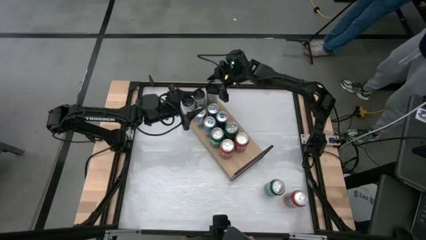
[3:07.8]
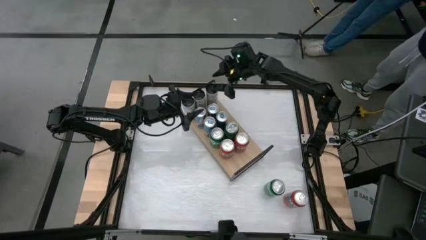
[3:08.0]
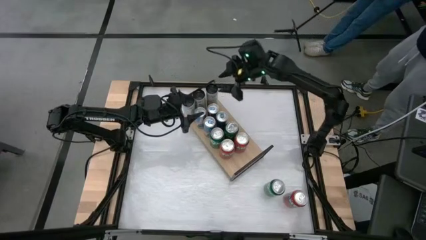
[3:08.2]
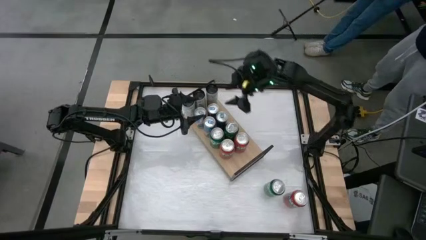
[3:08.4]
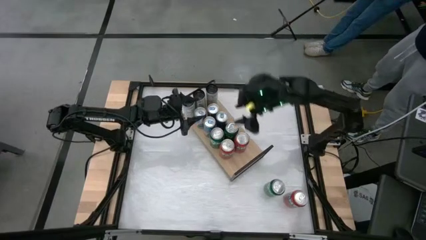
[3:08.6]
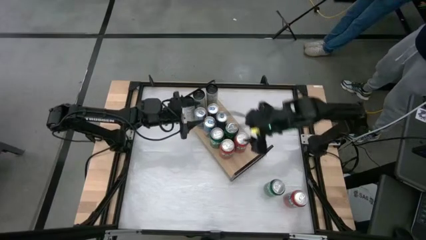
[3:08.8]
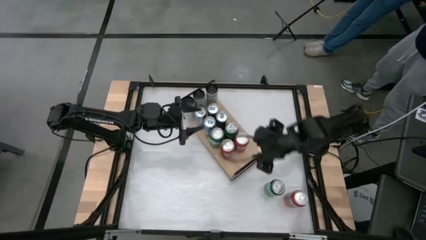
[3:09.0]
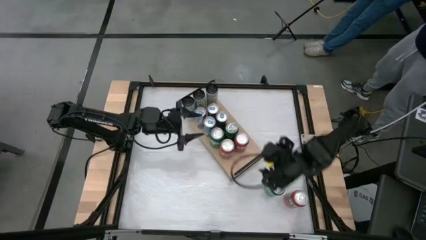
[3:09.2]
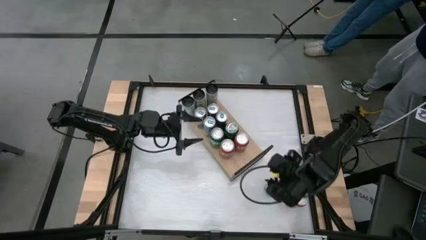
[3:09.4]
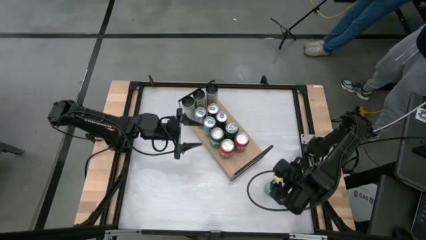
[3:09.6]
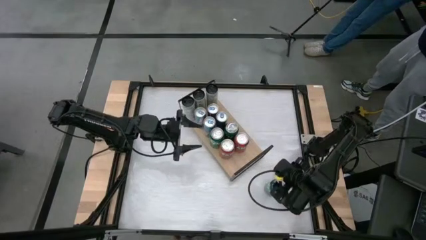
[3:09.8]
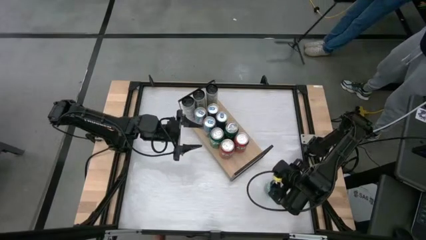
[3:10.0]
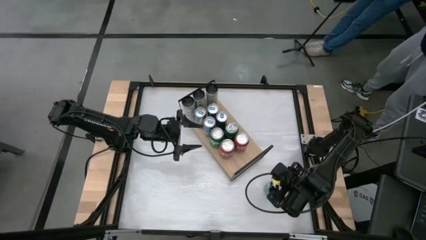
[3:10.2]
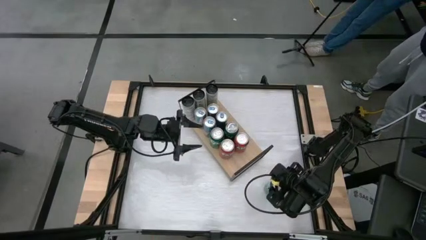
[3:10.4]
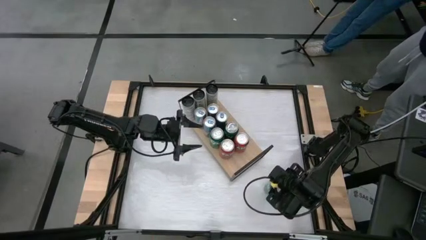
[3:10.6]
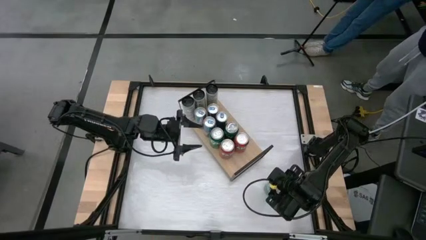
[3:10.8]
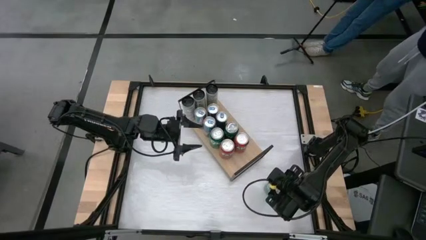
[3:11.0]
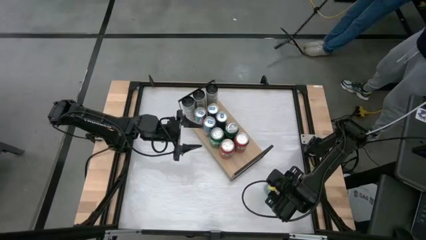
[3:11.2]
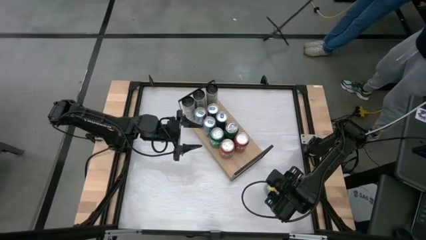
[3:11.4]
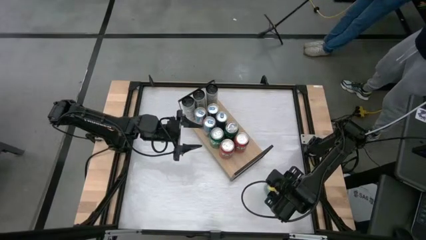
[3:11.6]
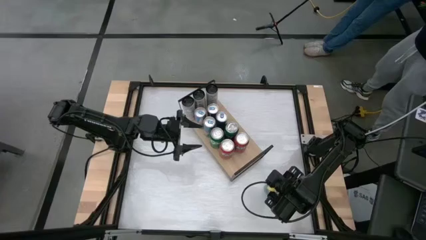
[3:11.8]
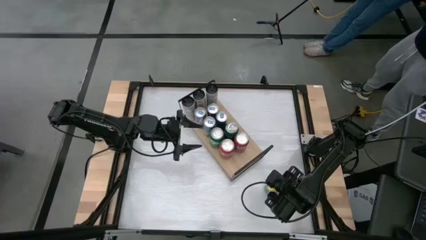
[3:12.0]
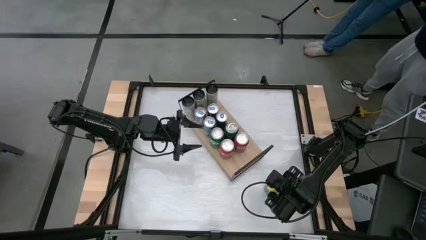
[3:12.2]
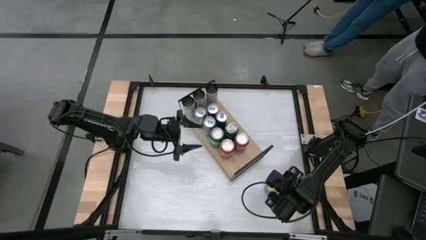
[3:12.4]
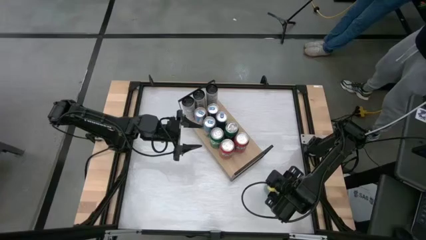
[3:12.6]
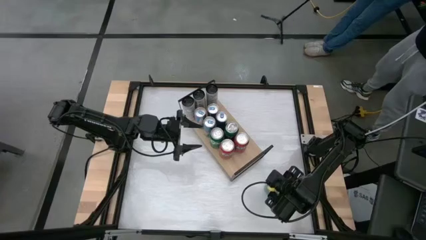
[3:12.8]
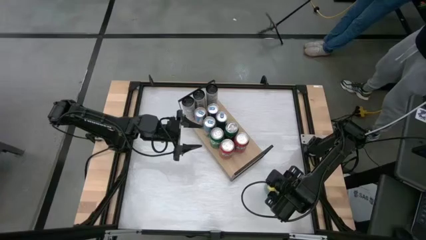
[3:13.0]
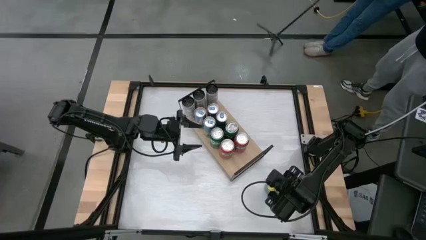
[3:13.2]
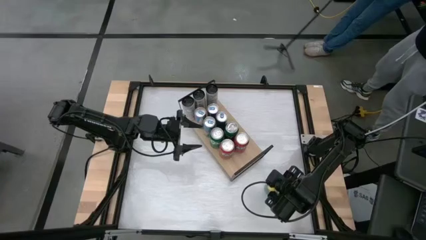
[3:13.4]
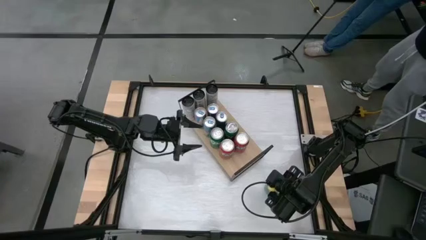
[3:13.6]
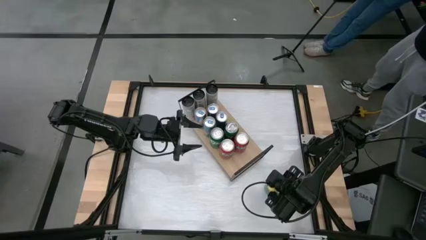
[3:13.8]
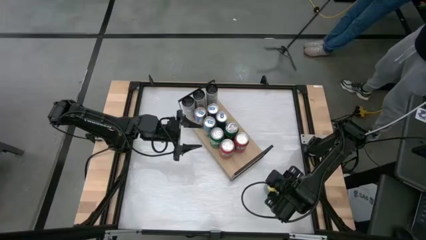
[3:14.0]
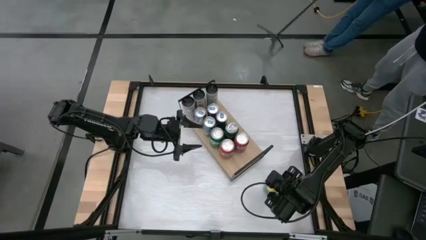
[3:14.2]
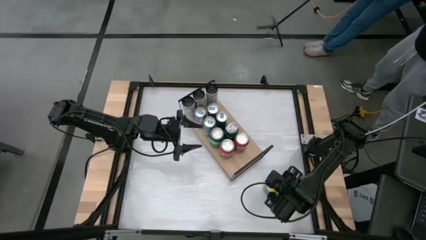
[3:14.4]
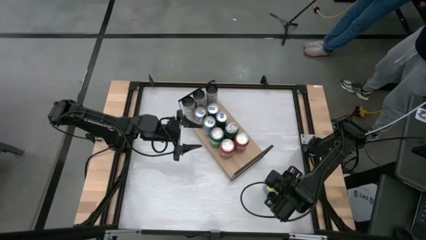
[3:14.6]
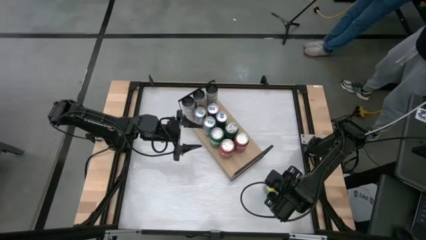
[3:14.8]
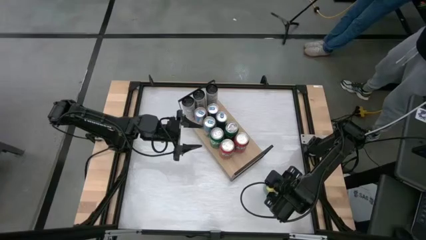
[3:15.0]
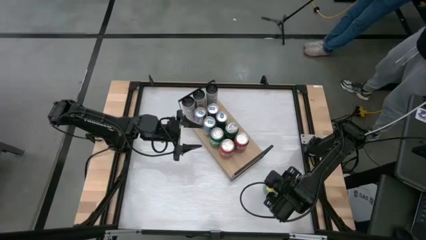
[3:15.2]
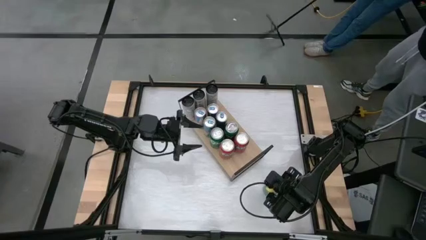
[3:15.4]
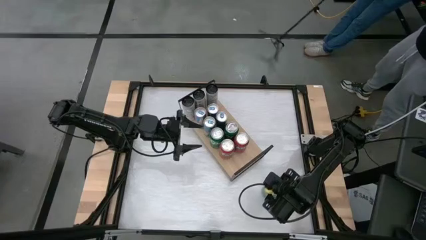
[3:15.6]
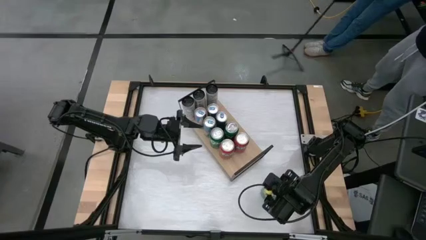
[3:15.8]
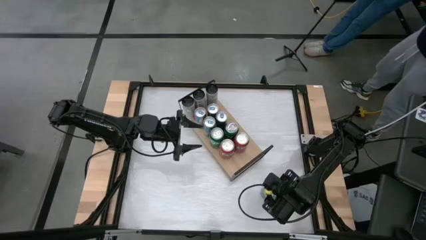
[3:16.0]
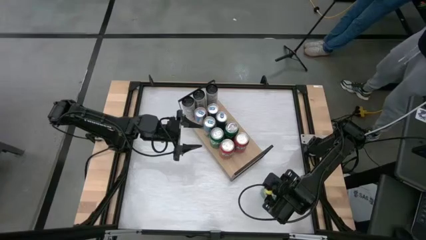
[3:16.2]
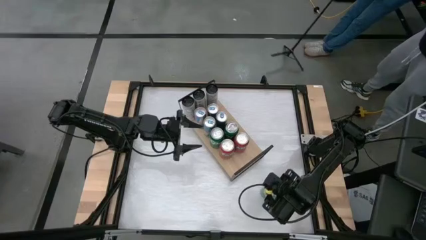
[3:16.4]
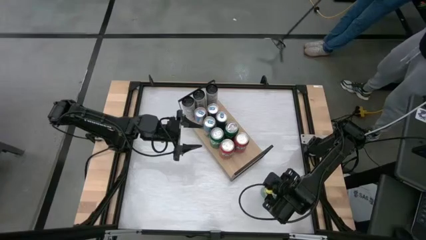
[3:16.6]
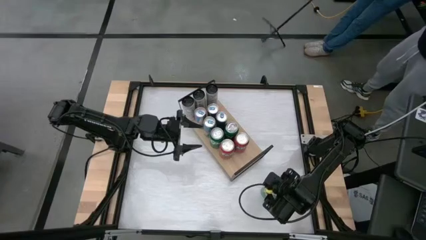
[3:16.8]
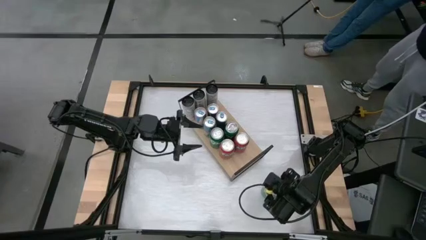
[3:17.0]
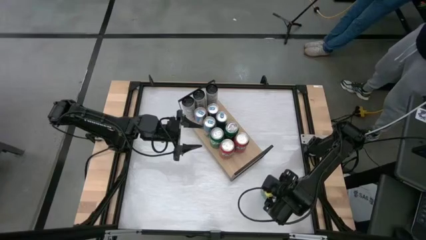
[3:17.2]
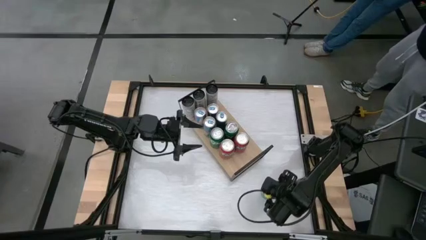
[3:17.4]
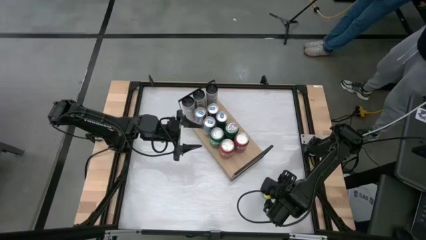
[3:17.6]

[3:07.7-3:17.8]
Task: Place canned beverage on shelf
Put the green soda can on the shelf

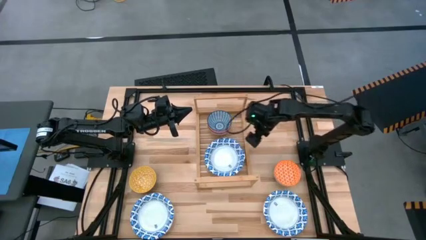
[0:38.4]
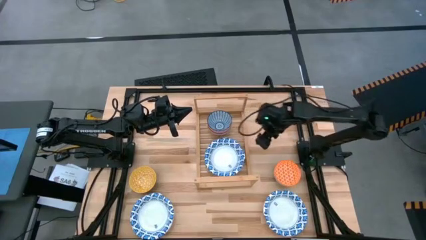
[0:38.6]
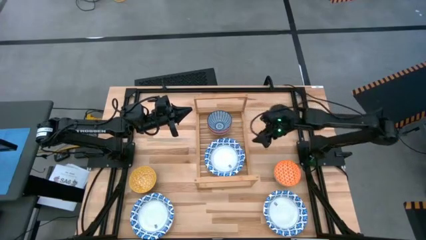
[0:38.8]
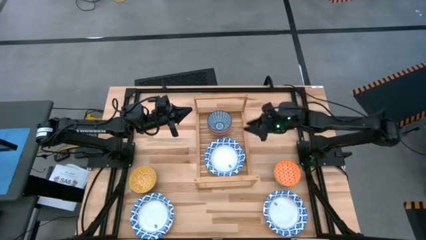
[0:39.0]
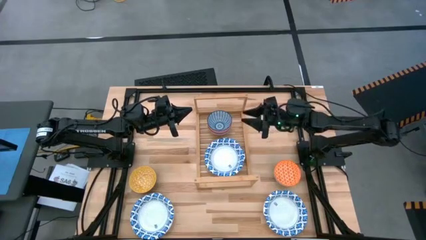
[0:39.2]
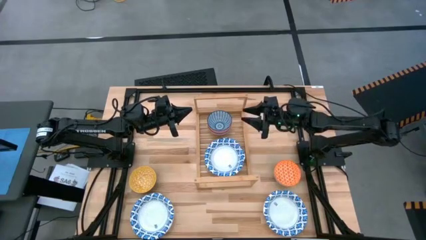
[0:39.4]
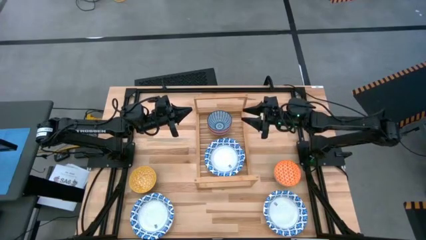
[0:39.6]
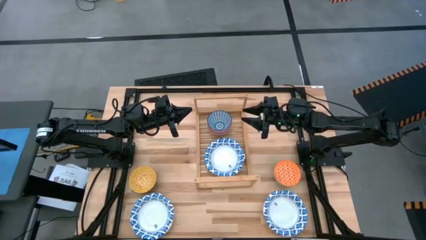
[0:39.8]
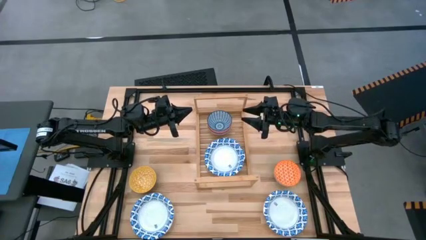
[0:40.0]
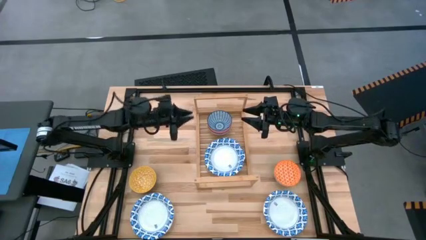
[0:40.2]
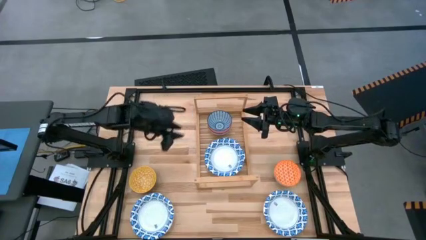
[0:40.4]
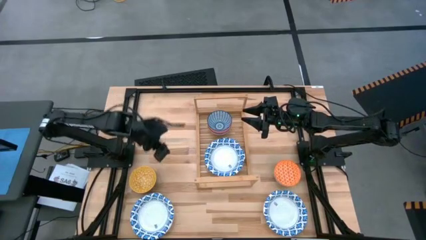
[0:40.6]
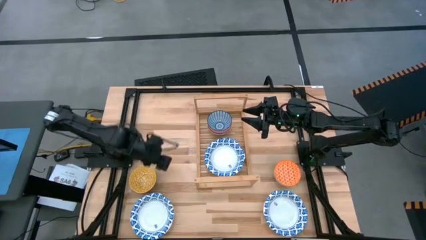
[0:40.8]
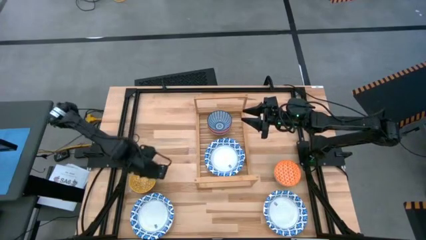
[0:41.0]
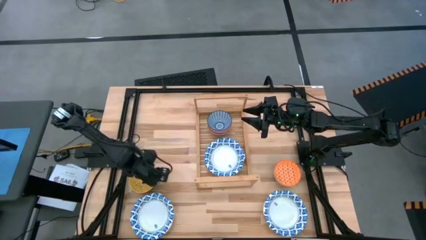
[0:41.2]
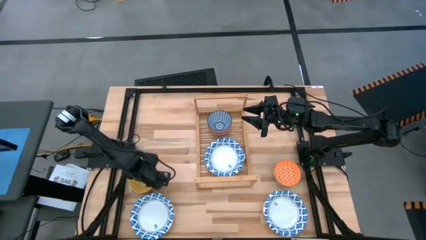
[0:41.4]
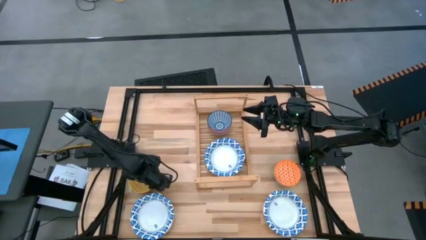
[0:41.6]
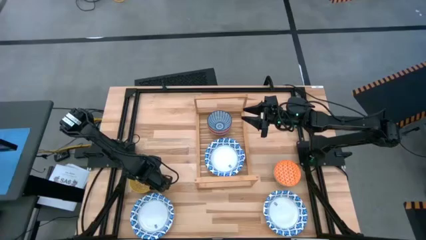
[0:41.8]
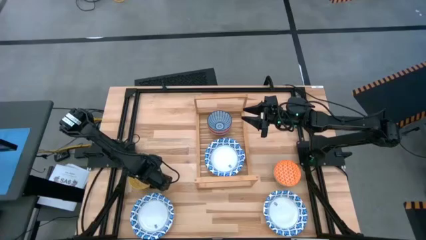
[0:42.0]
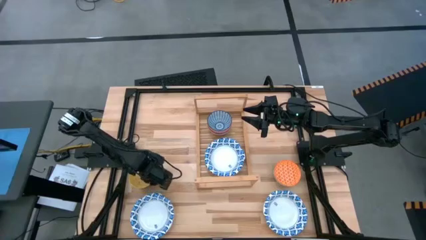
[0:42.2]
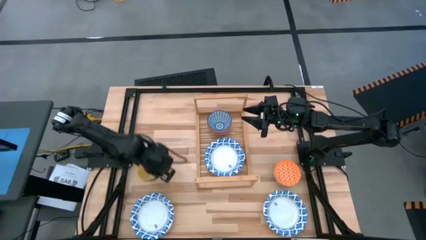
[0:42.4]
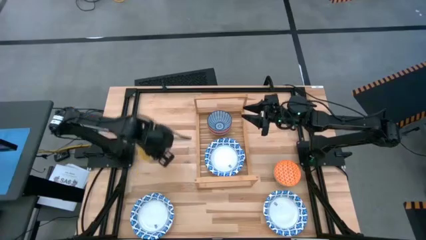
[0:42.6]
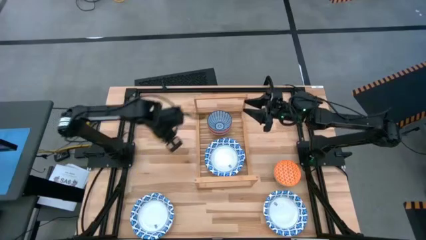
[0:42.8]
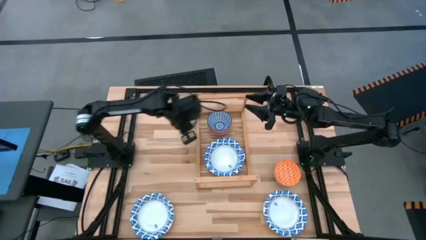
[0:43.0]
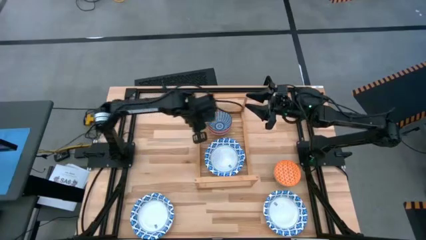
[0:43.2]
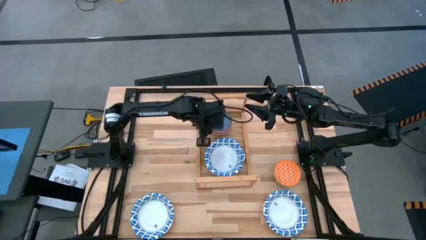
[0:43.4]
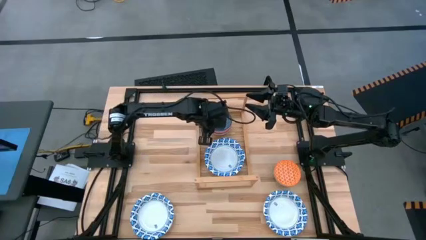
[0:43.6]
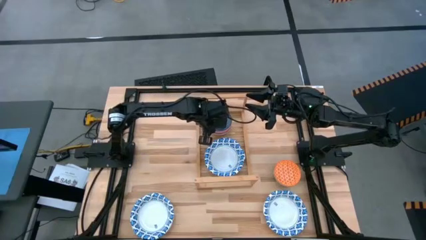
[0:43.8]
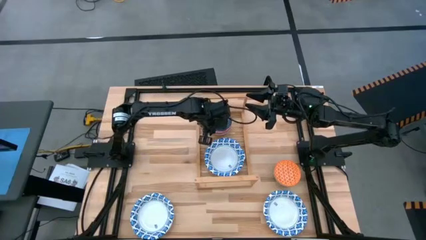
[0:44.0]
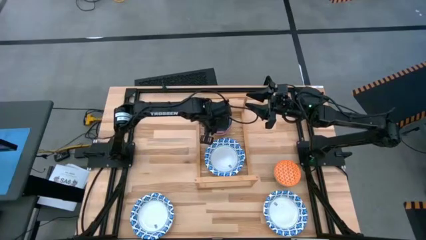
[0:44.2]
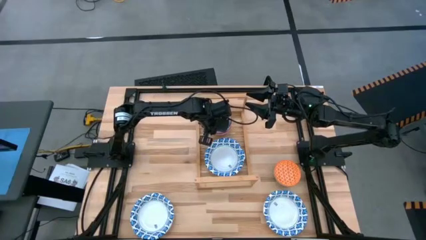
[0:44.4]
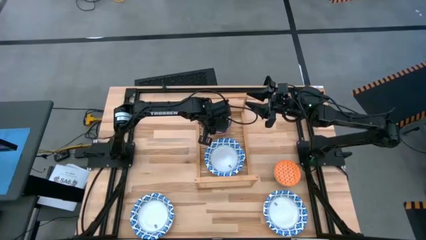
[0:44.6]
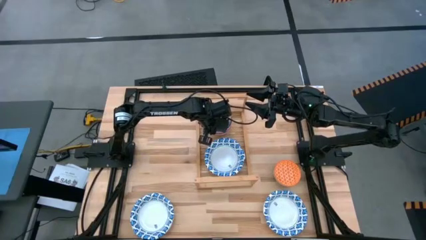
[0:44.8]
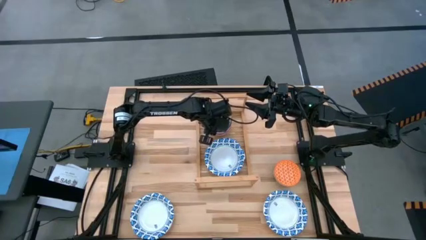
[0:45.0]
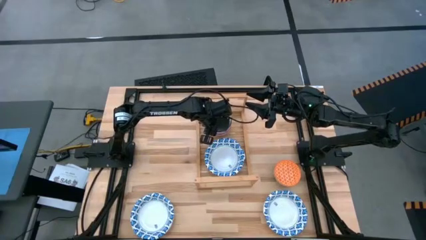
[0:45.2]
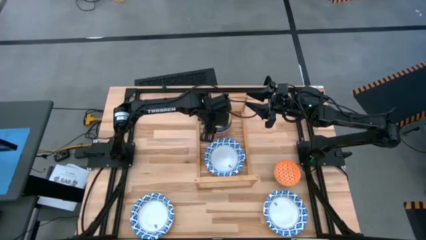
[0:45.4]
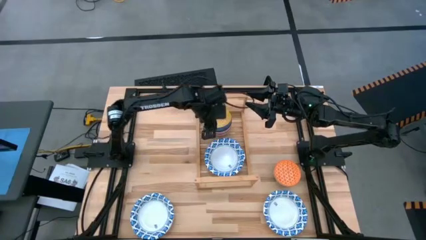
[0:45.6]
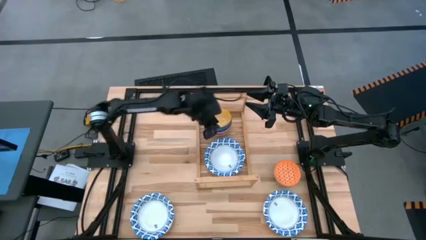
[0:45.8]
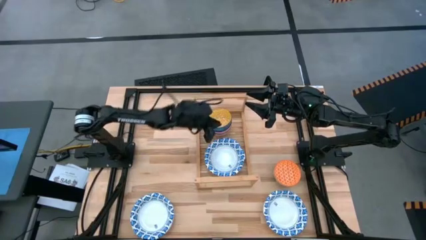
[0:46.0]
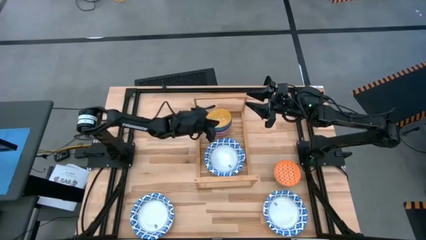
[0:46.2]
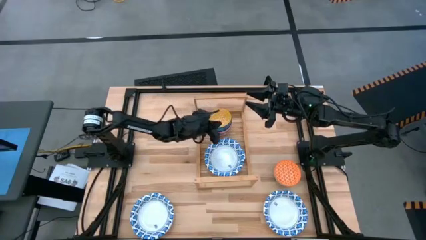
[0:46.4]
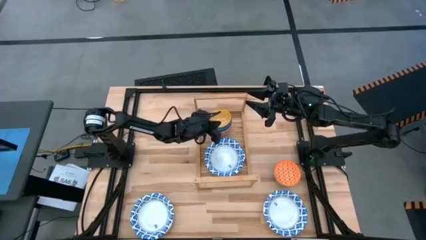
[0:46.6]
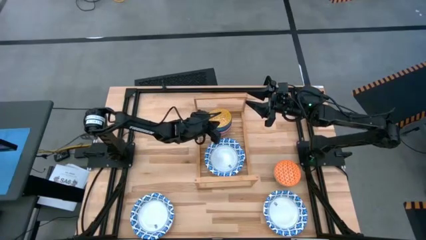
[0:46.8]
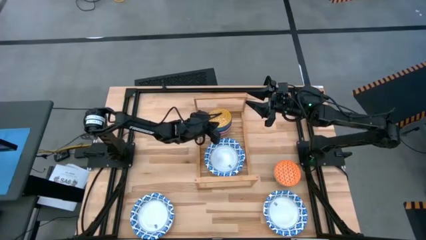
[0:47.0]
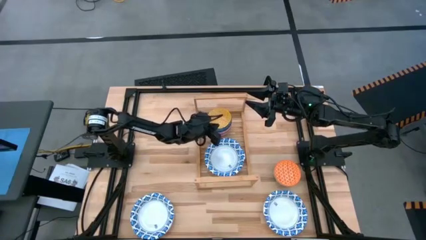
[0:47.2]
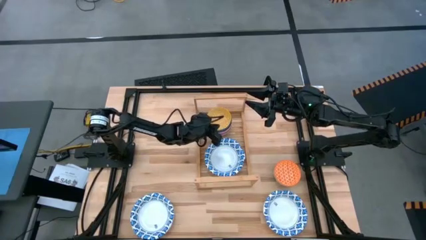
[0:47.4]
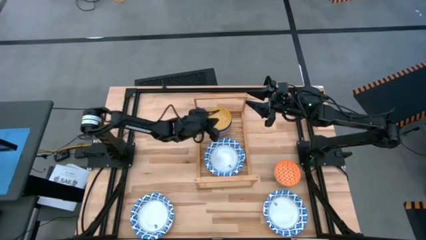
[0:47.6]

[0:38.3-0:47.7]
Task: Place and stack bowls onto a shelf
Stack the yellow bowl on top of the blue bowl on the shelf
